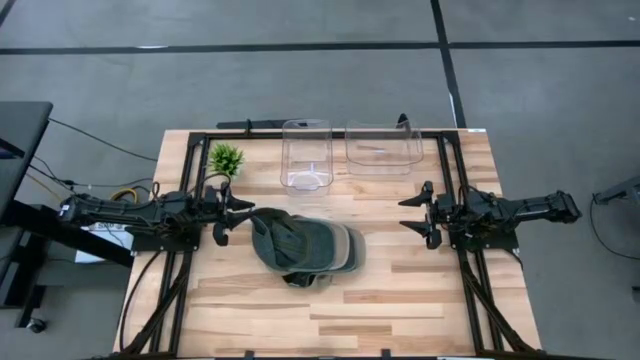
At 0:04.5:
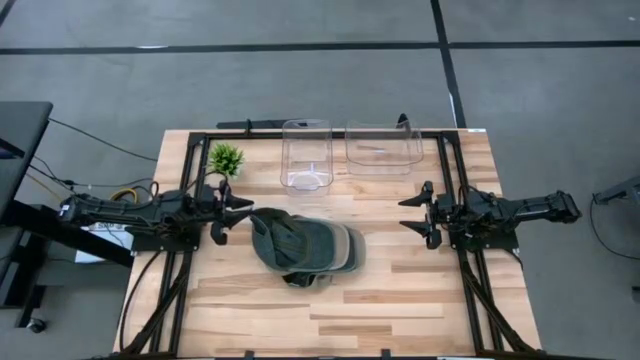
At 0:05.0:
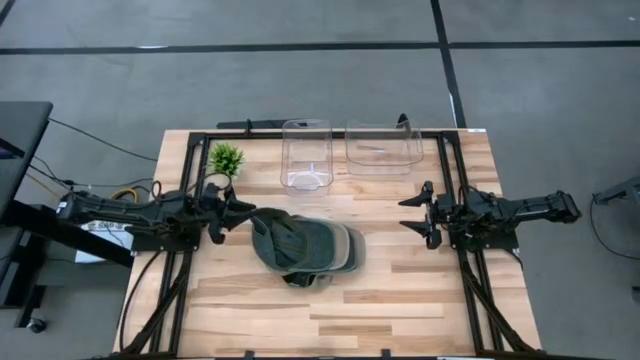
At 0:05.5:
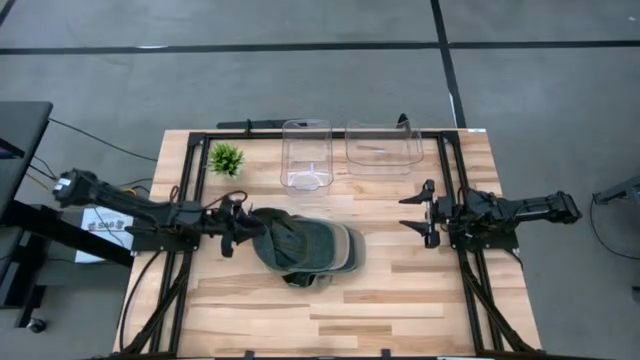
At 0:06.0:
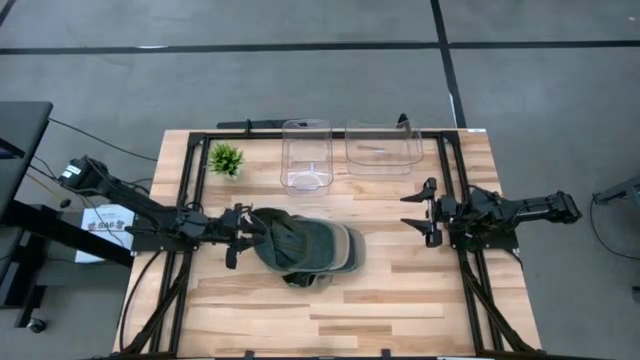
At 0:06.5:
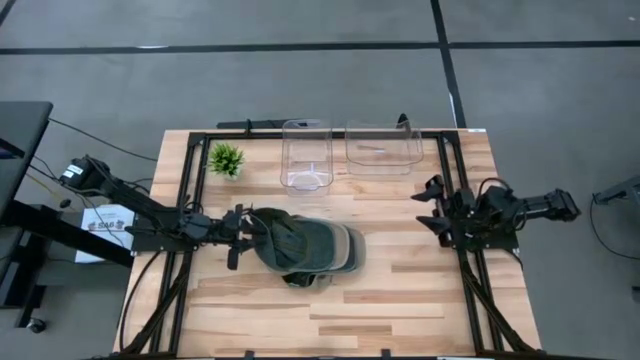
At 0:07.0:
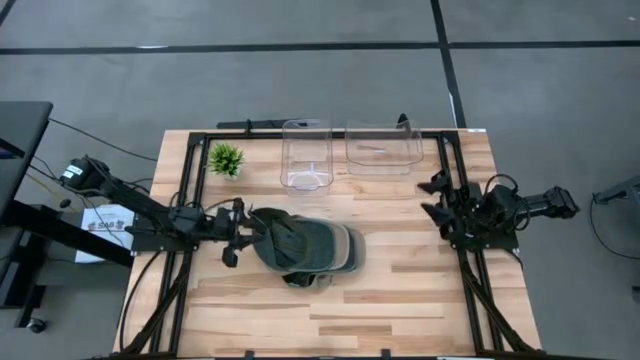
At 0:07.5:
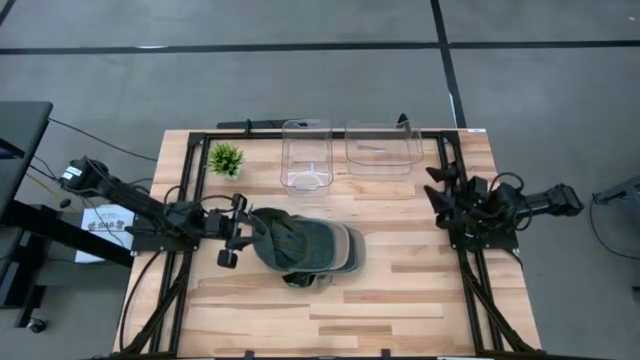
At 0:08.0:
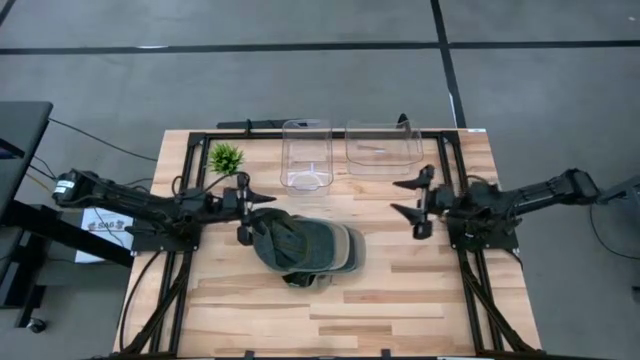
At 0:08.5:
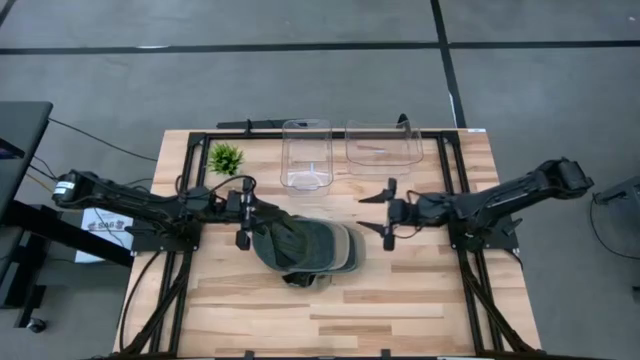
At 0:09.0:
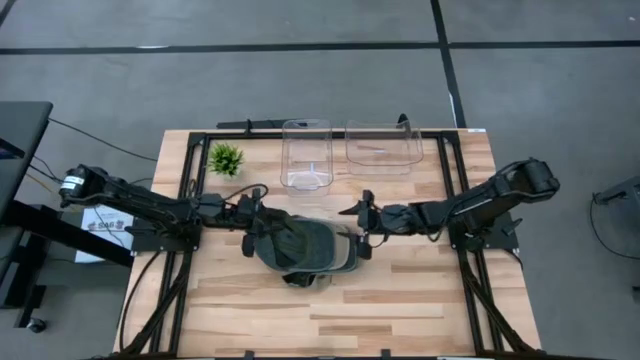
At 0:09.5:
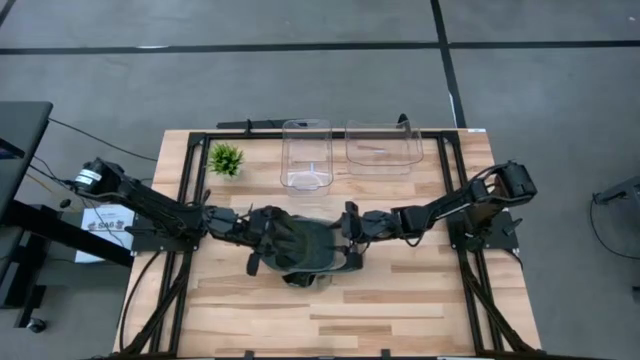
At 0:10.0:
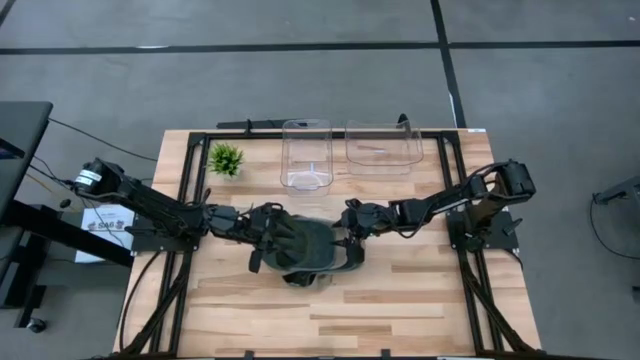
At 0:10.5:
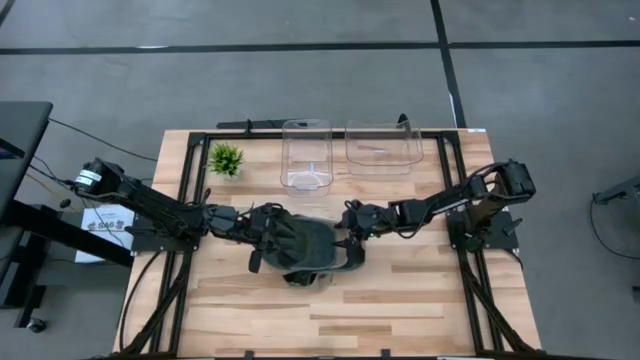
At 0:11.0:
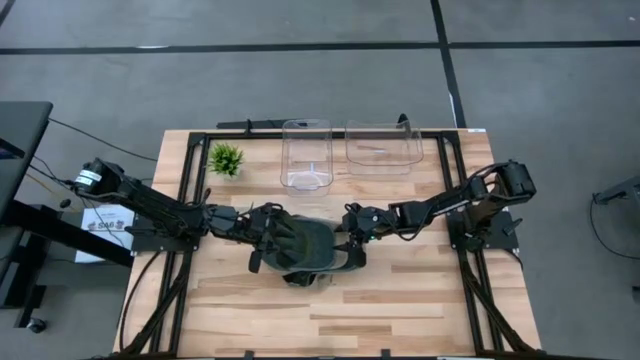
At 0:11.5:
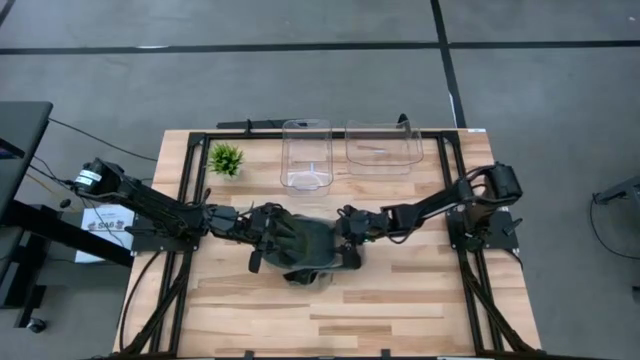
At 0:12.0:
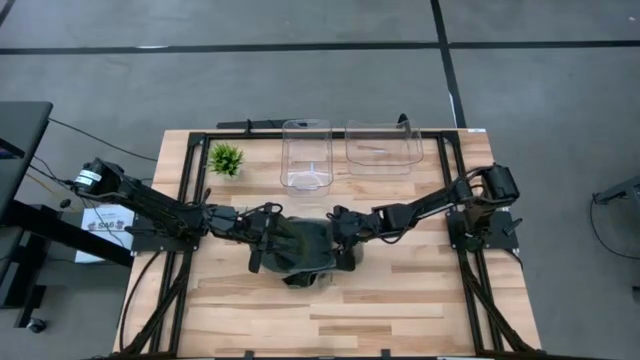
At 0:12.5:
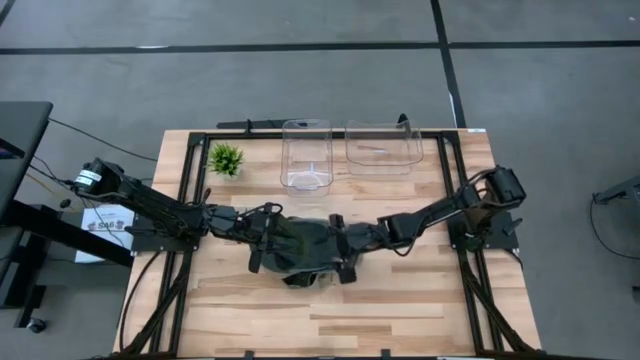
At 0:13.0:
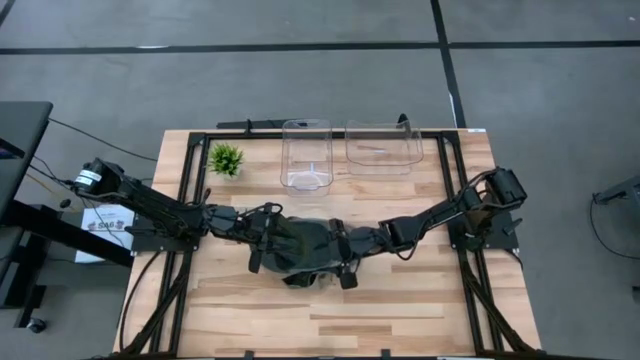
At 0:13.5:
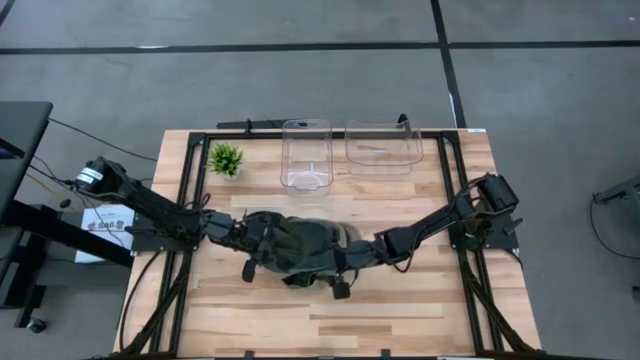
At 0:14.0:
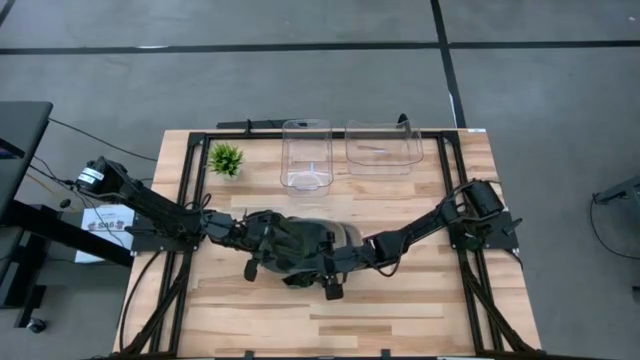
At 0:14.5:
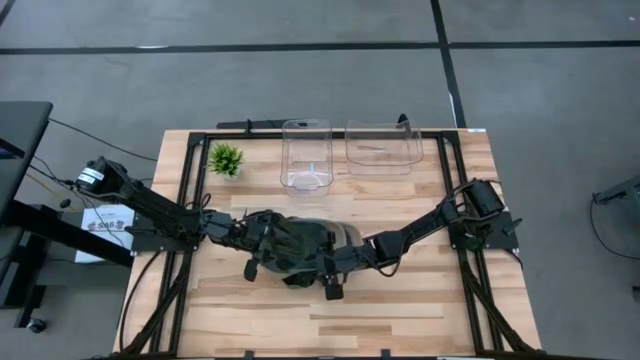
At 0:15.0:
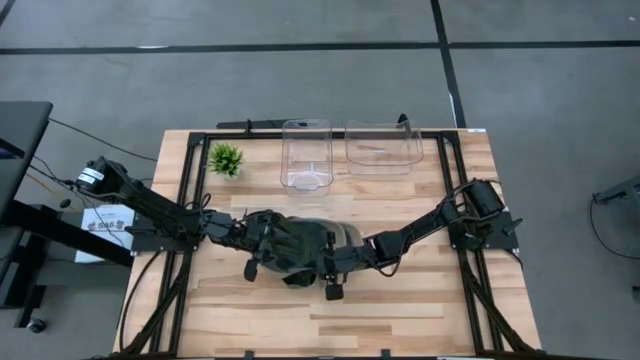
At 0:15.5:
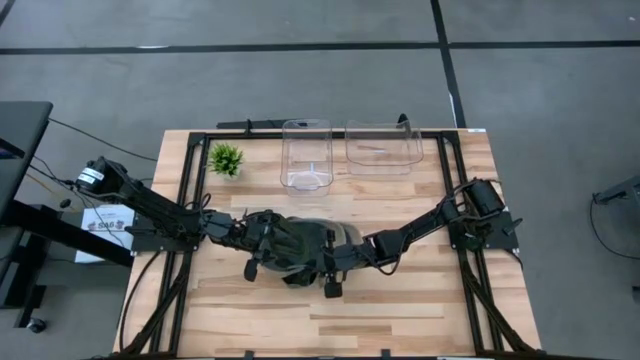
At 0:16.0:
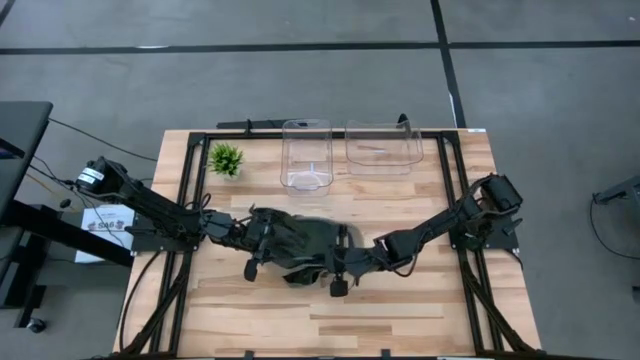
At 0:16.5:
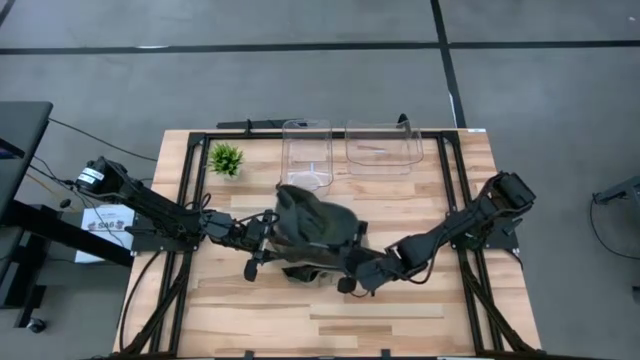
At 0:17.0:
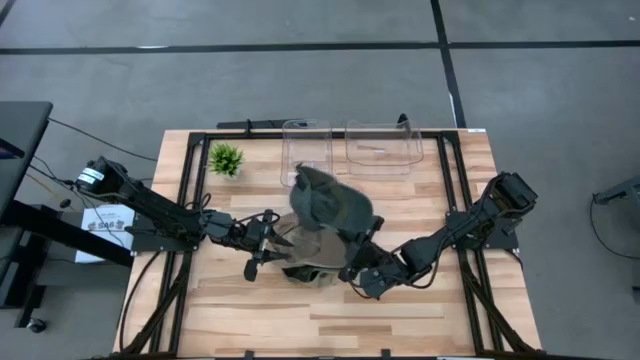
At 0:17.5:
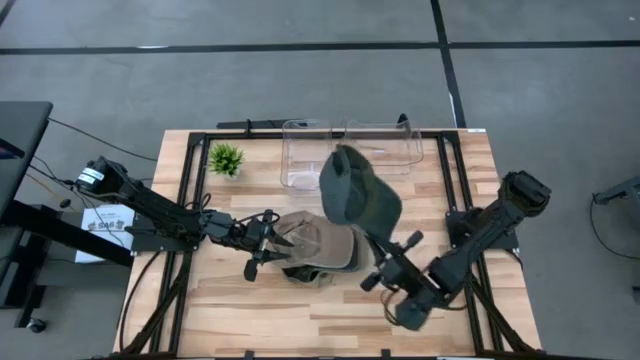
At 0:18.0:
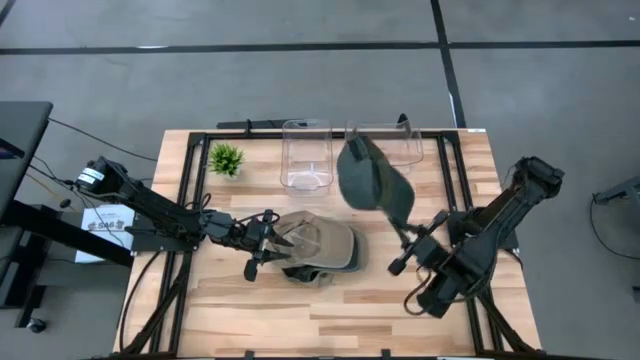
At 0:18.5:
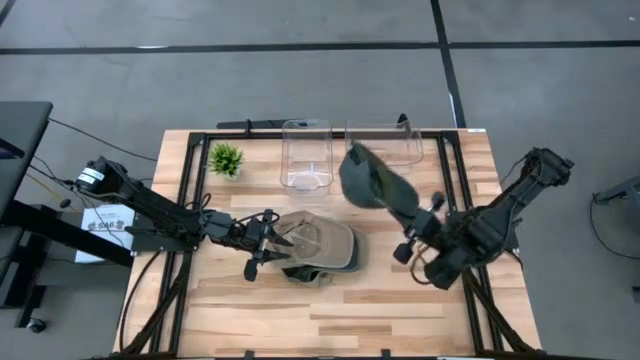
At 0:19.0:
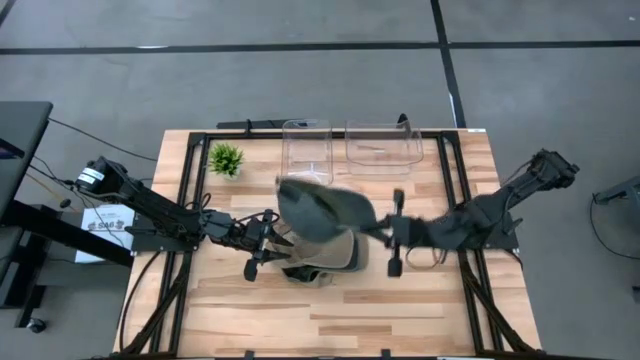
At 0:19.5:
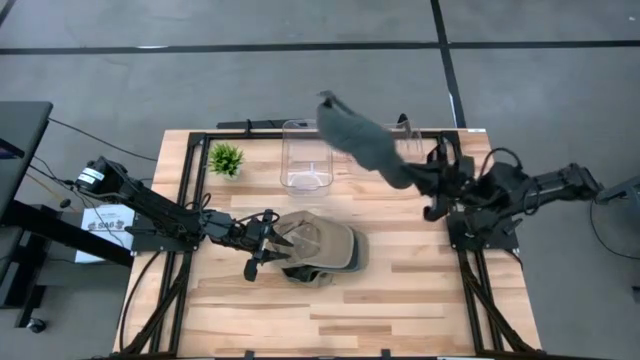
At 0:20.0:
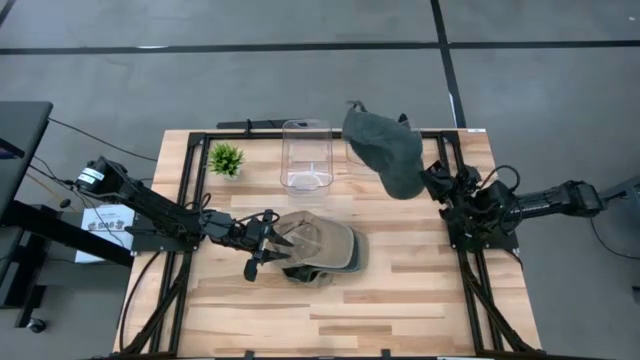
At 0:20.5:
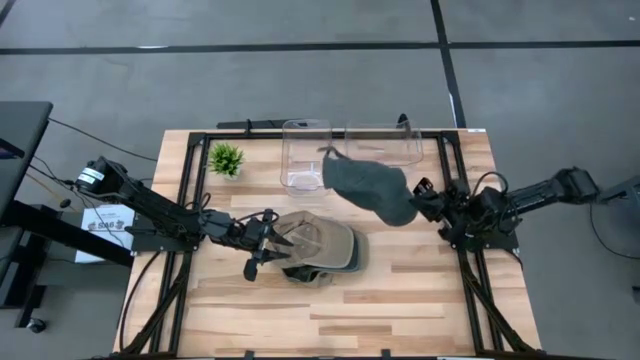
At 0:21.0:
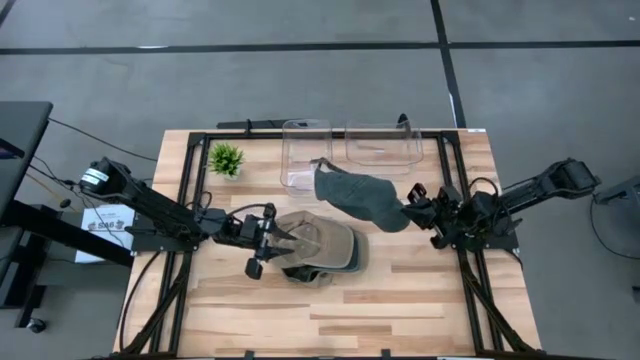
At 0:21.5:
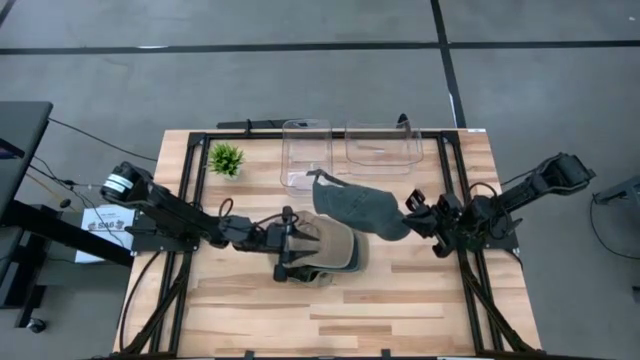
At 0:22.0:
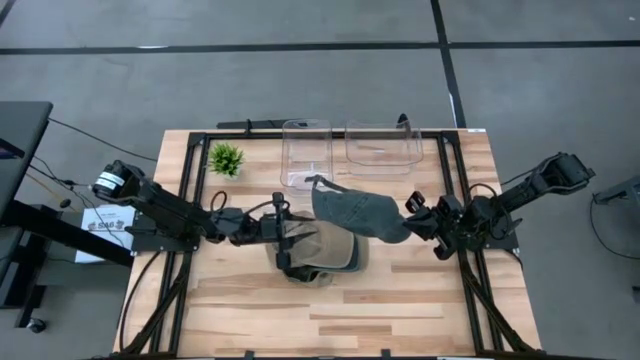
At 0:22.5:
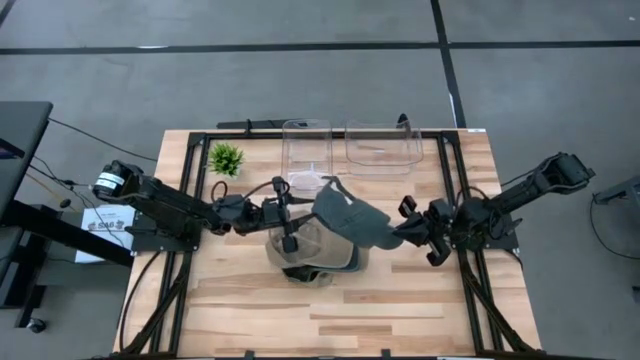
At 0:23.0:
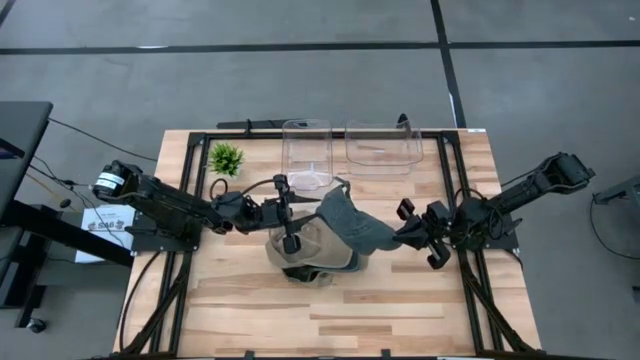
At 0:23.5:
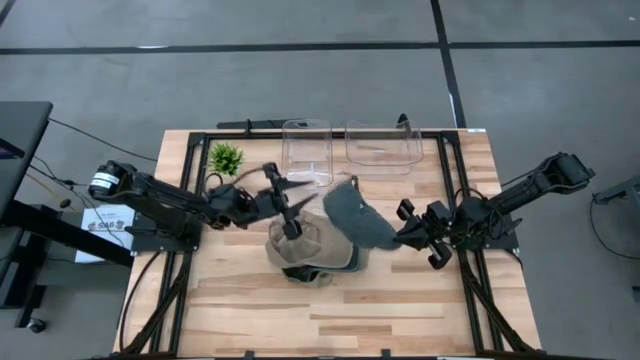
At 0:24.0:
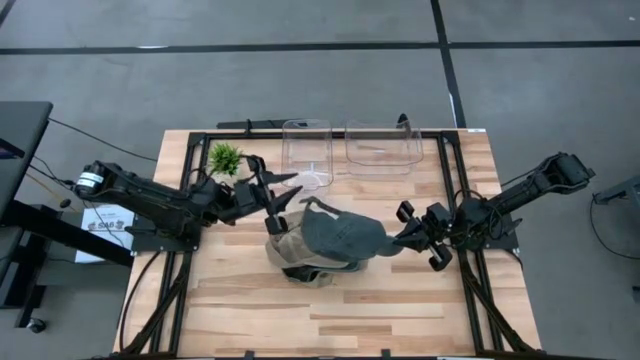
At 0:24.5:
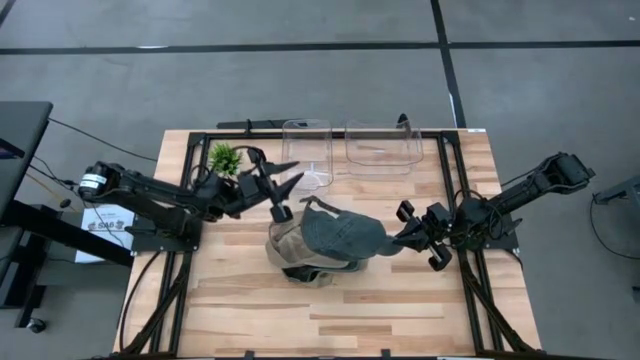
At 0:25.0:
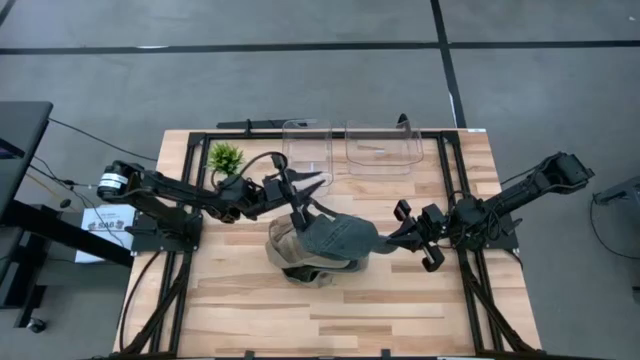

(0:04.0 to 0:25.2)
Task: Pick & Place hat
Put the black cap into the left transparent bin
